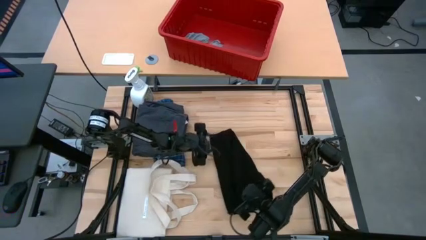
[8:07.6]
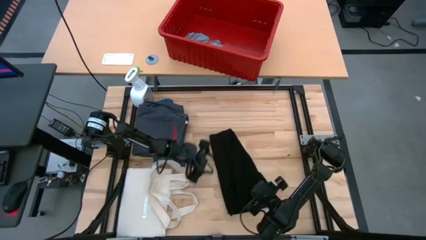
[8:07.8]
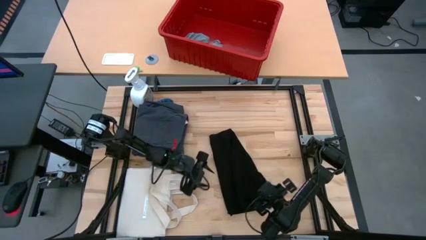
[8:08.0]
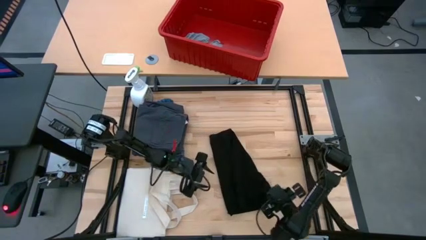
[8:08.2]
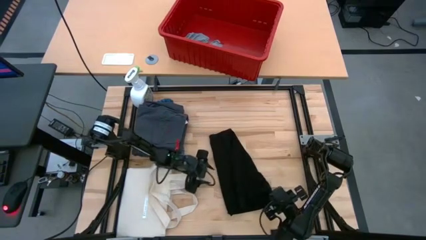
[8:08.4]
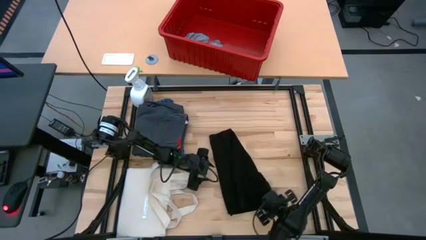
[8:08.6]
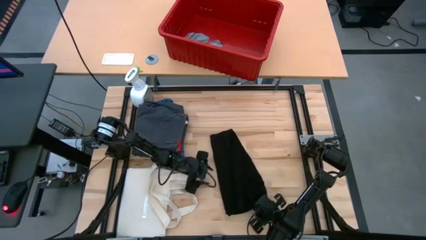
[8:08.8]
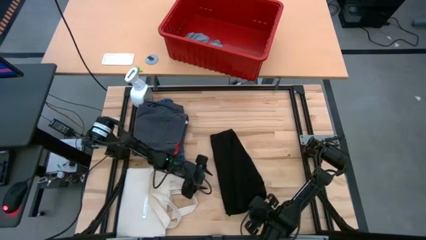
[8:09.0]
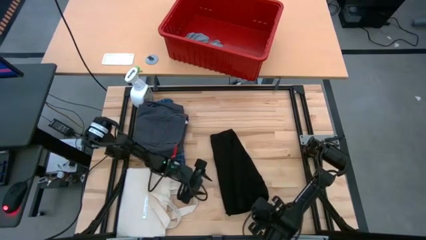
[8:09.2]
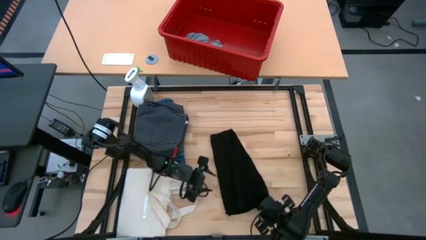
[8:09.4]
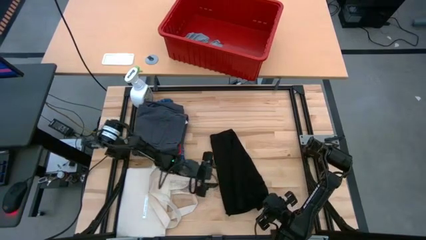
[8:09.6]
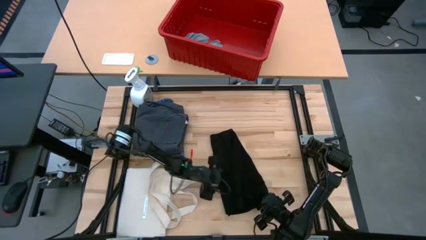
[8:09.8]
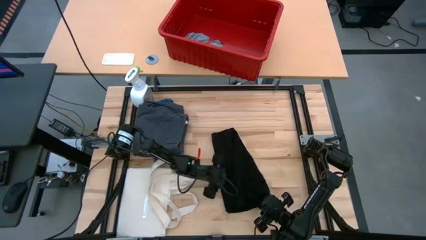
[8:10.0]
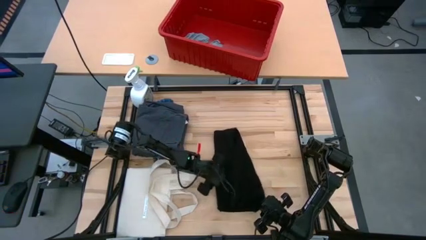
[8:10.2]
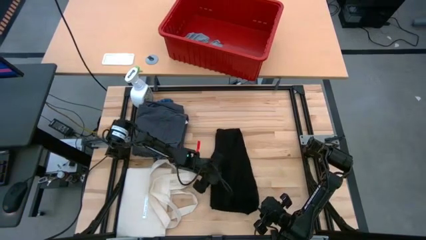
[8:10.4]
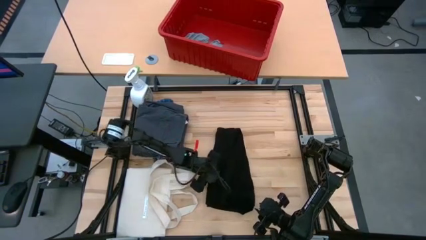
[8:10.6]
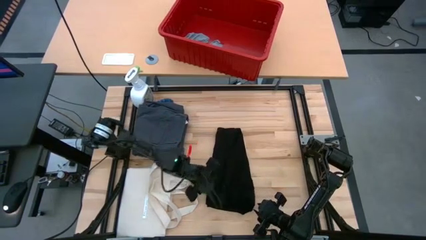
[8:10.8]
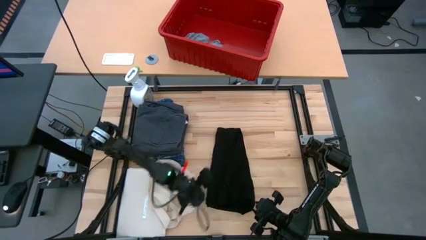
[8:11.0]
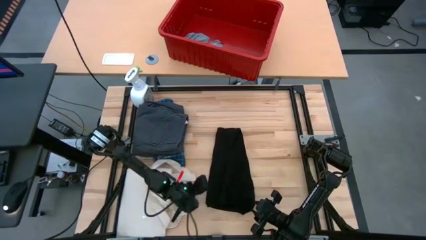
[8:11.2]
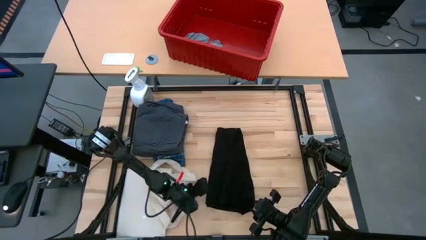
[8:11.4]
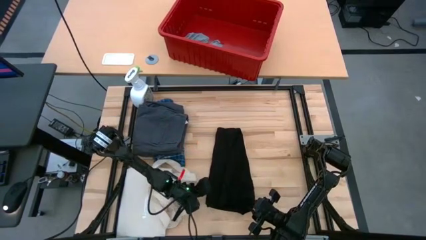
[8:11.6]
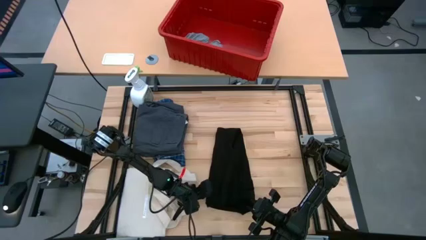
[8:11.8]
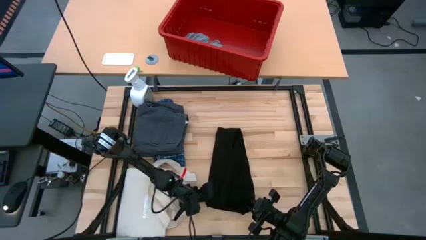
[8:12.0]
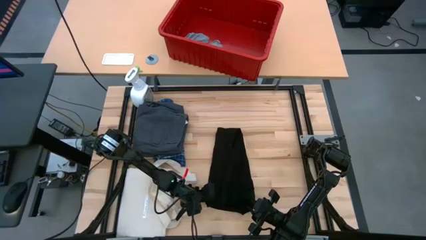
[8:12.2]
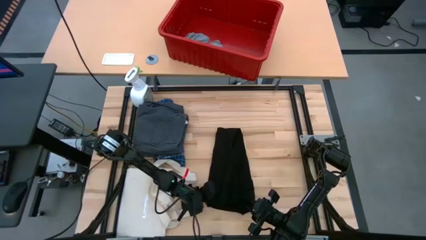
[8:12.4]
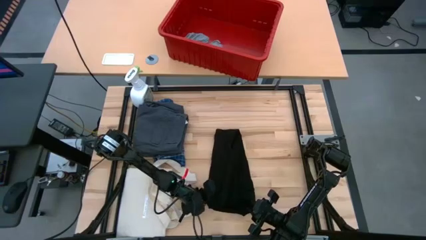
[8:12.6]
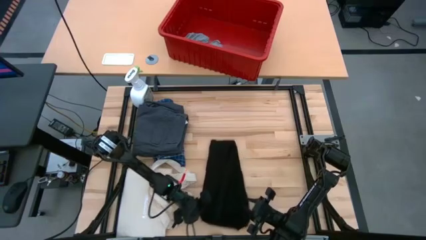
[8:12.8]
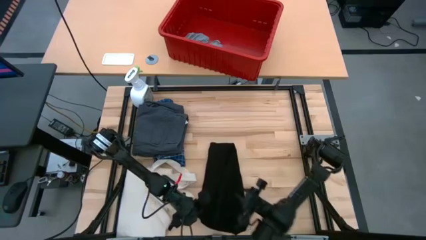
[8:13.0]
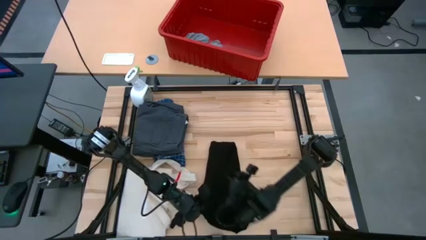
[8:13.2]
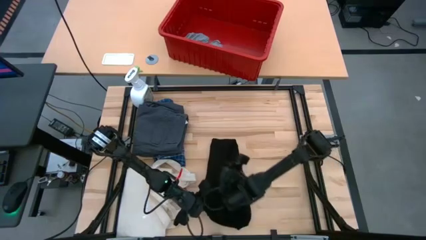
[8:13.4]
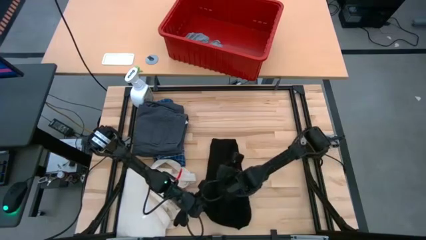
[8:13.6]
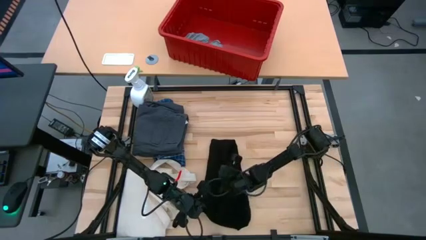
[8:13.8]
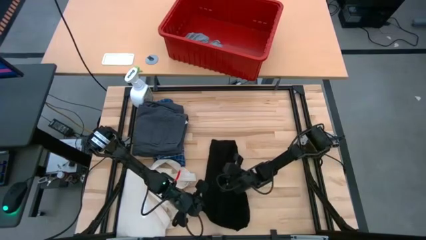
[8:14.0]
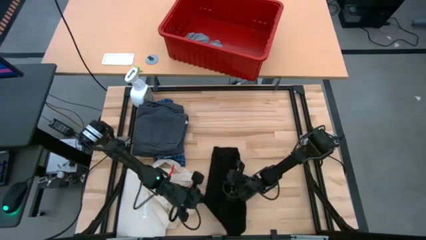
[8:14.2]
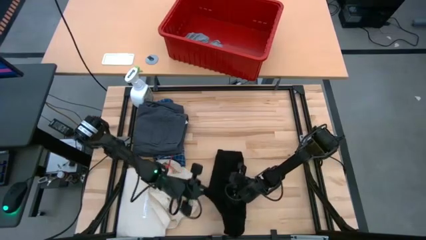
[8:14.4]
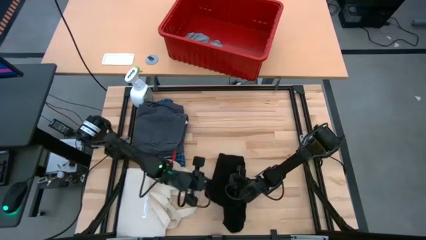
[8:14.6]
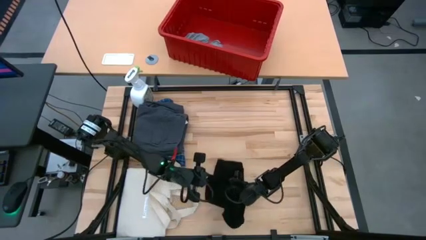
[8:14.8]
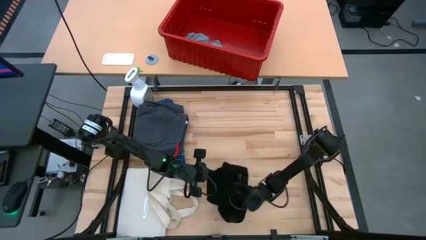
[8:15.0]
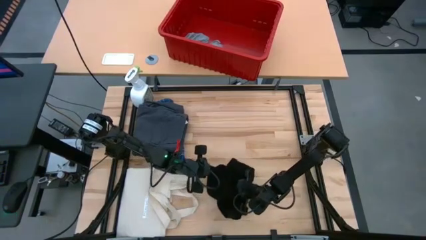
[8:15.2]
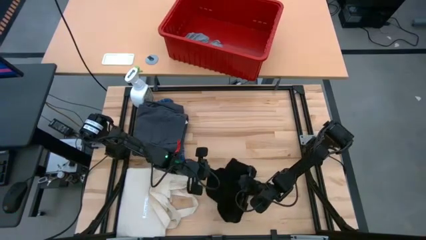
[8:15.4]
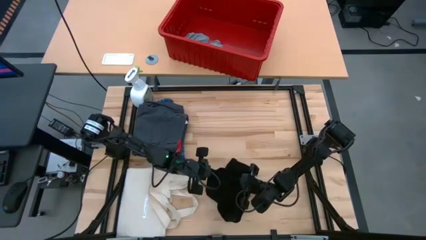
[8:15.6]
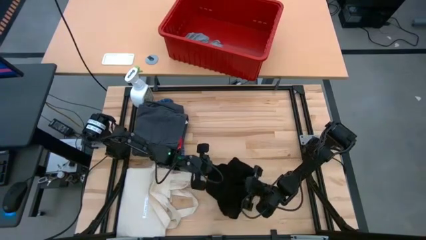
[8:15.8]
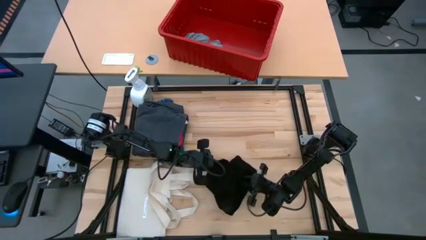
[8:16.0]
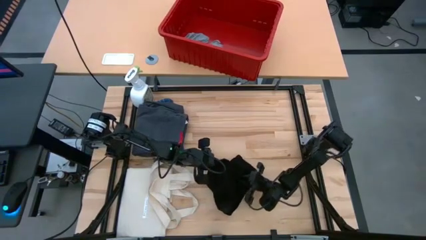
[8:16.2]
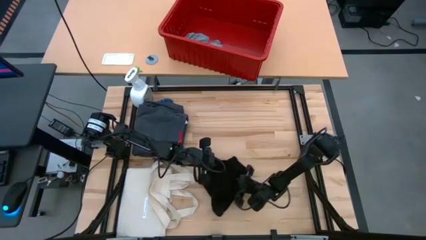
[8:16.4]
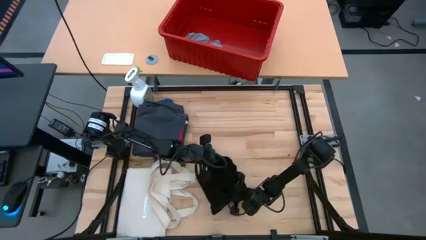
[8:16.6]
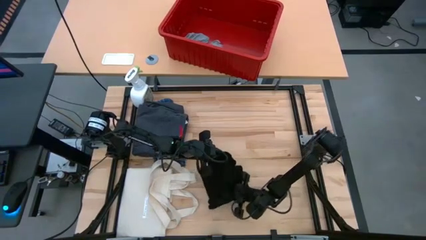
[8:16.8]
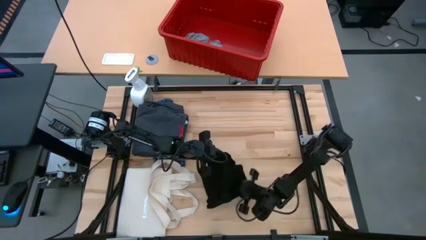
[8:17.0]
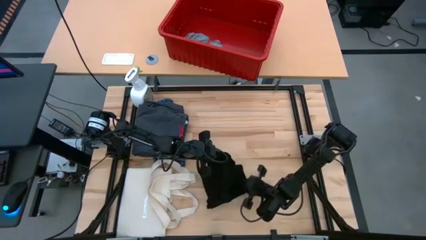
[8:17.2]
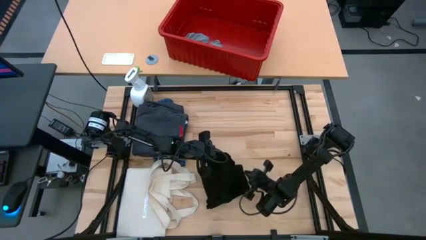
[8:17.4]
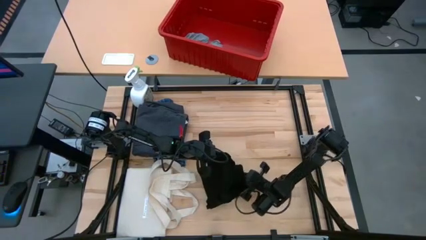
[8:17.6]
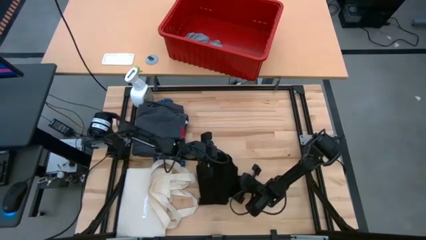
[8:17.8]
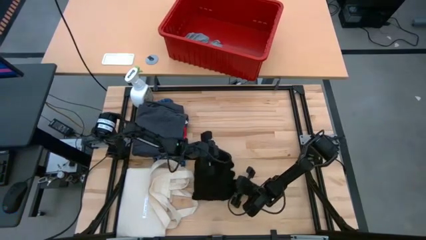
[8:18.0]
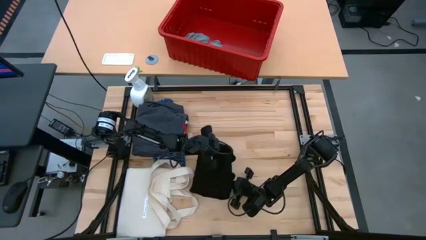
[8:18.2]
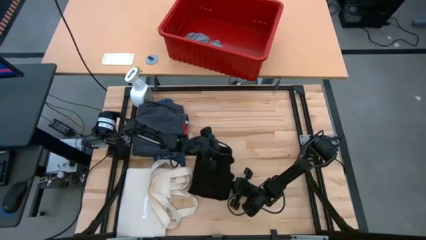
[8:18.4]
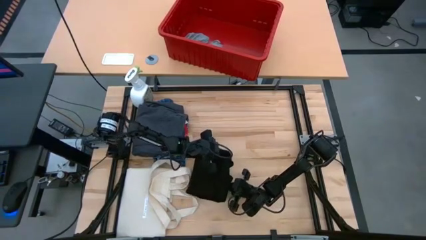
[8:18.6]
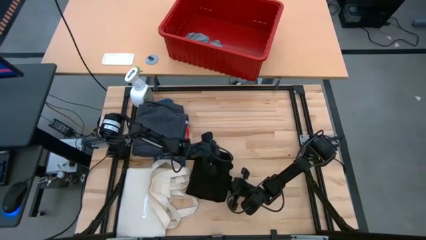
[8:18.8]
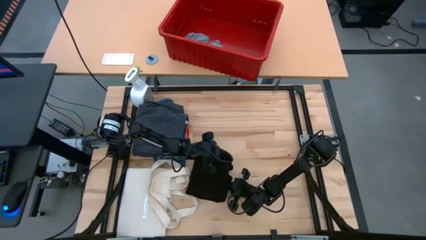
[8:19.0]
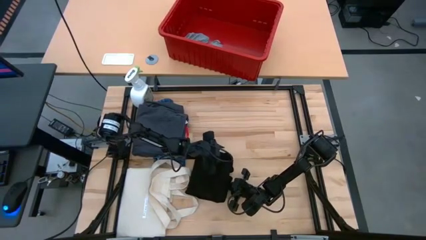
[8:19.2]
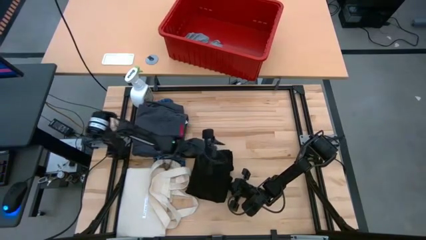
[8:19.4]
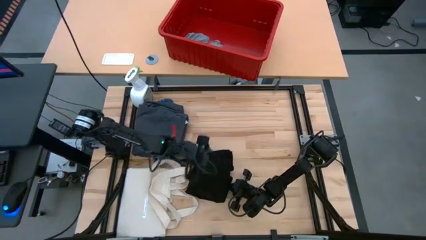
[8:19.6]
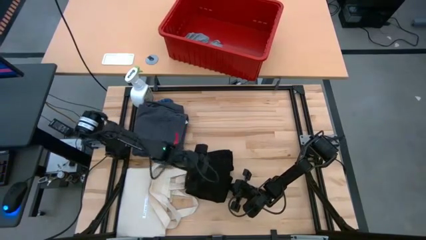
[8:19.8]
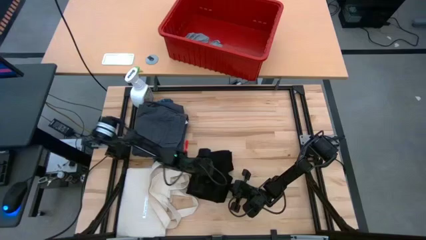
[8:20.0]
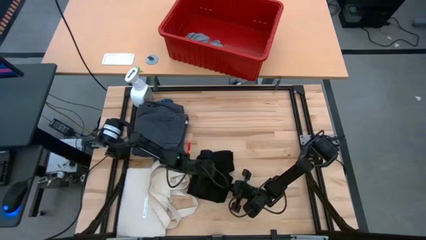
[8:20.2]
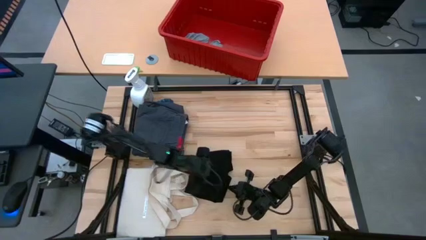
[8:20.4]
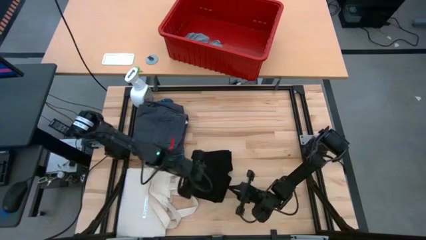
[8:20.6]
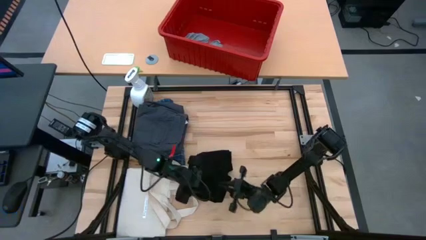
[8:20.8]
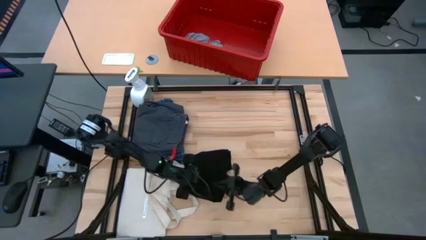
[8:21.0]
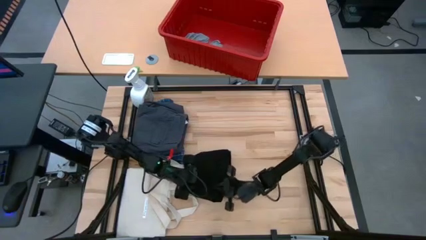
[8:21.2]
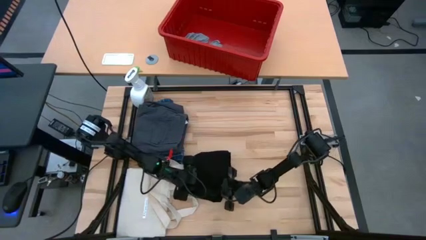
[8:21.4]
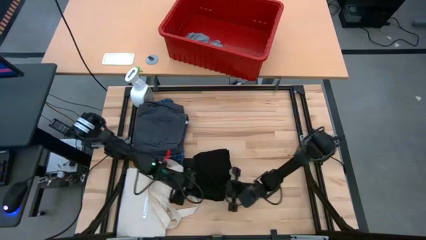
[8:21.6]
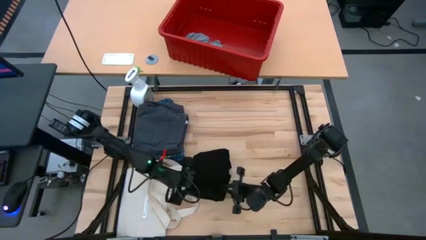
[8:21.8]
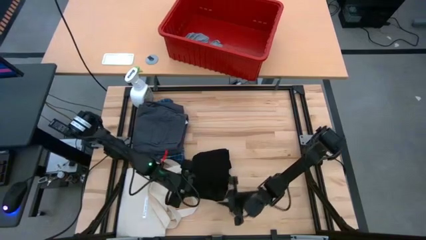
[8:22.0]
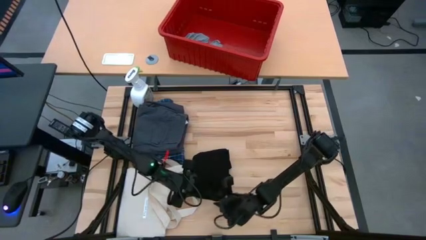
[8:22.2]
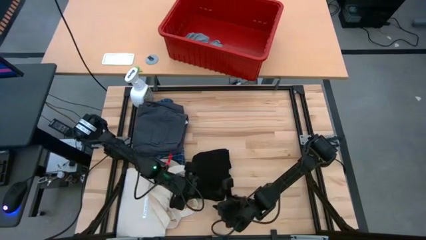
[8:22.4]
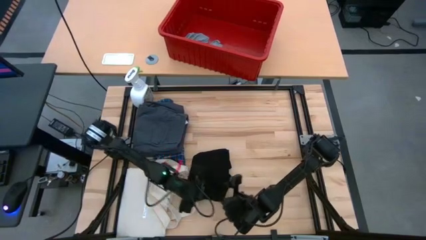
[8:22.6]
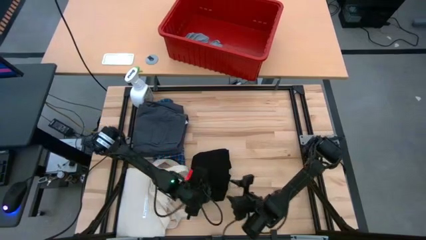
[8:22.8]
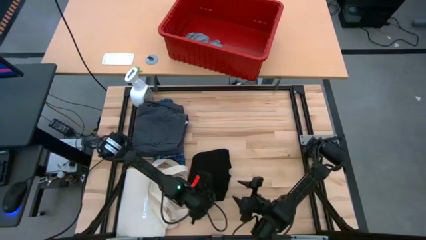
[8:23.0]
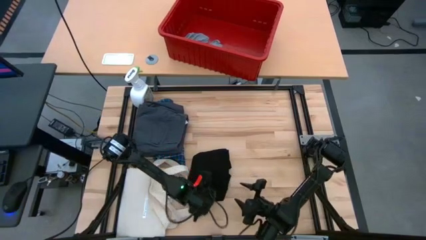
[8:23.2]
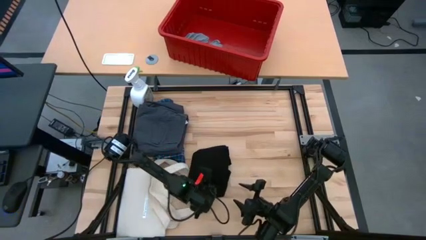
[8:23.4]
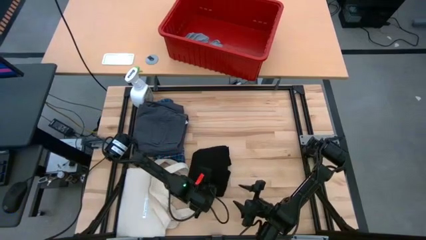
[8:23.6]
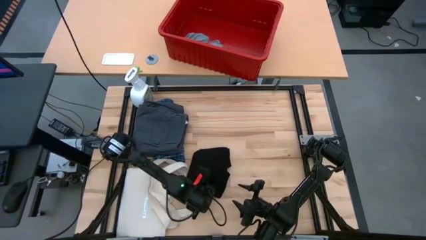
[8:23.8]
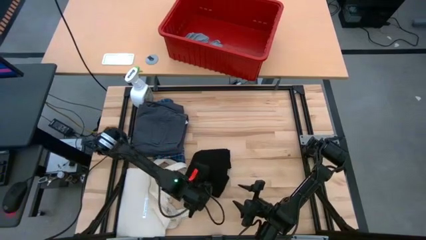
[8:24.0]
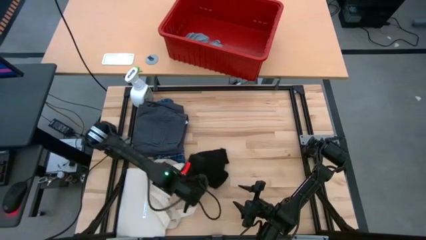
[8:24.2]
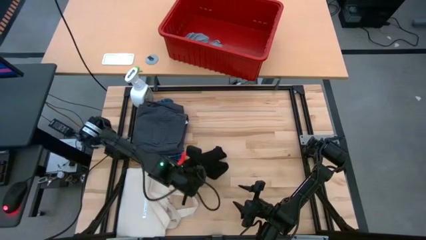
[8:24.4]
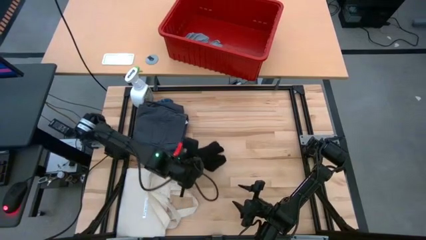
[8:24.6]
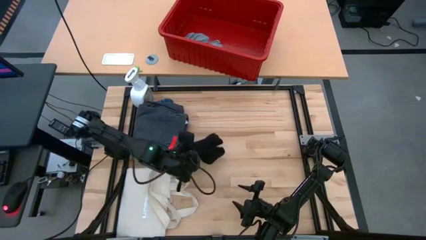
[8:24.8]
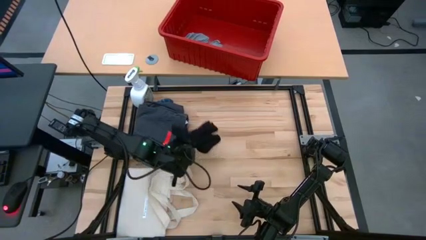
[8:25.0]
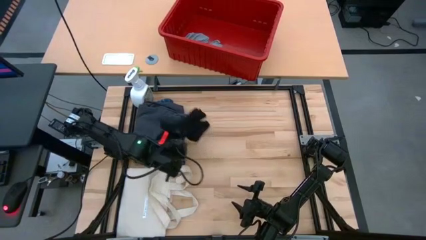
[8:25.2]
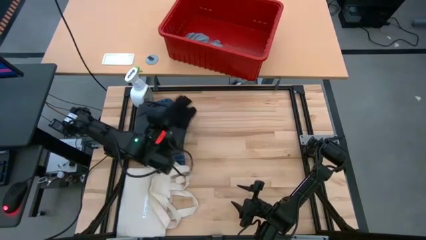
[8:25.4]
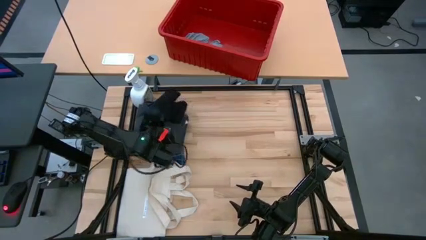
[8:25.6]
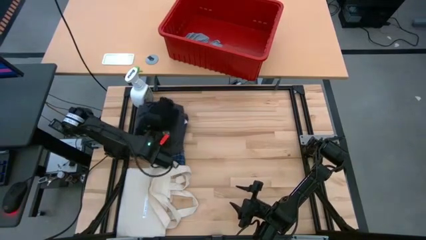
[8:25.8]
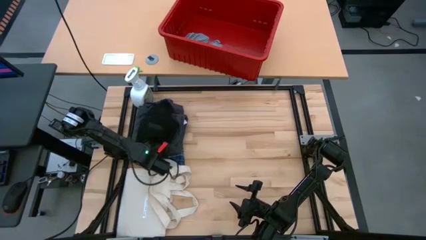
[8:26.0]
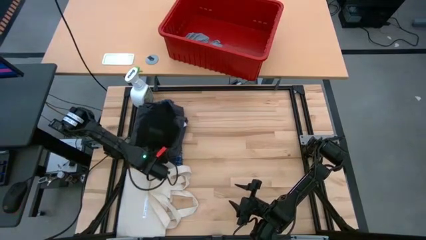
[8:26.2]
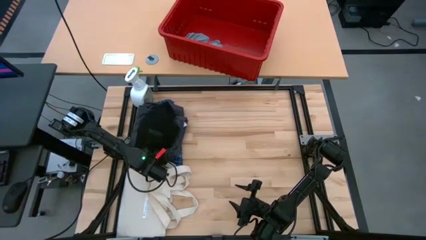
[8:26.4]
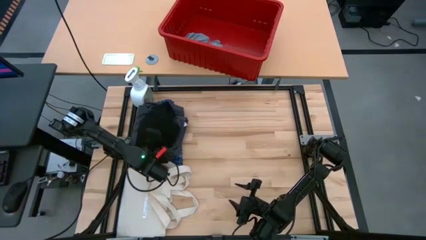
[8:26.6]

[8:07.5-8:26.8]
Task: Fold Laundry from Bin
Fold the black shirt
